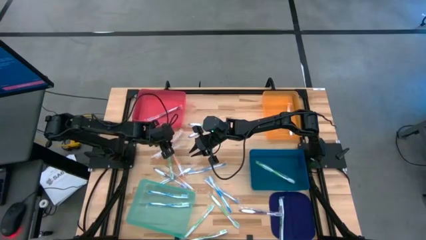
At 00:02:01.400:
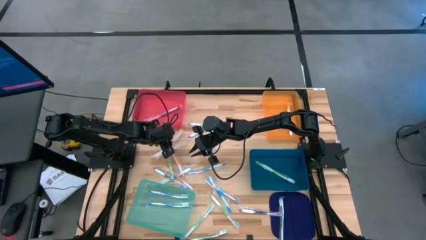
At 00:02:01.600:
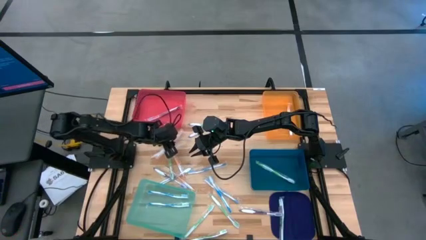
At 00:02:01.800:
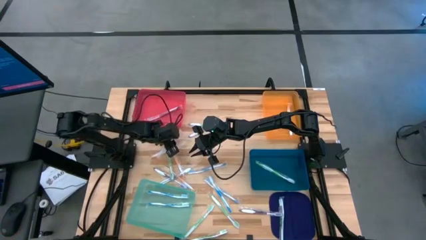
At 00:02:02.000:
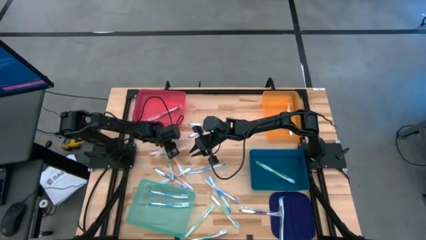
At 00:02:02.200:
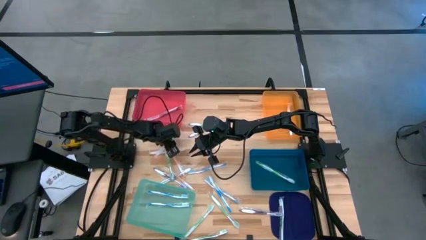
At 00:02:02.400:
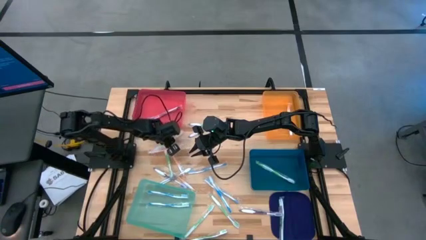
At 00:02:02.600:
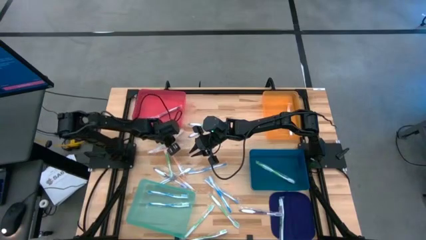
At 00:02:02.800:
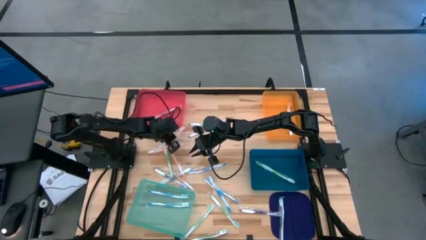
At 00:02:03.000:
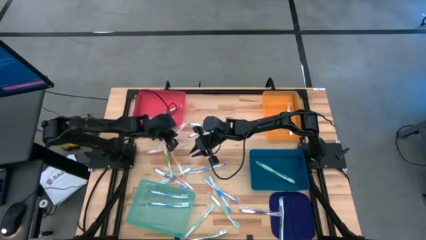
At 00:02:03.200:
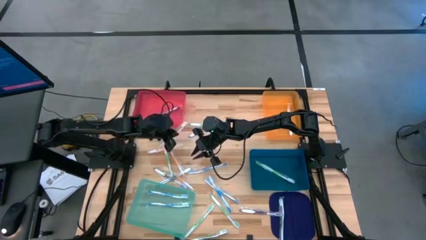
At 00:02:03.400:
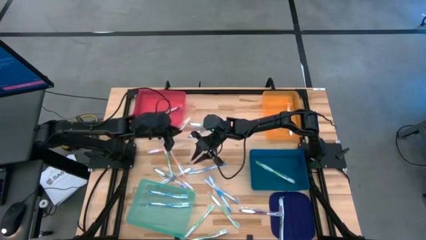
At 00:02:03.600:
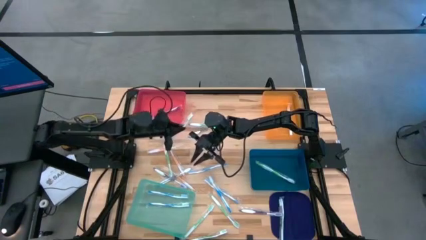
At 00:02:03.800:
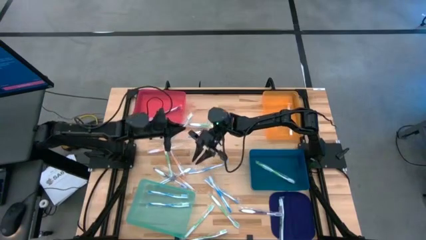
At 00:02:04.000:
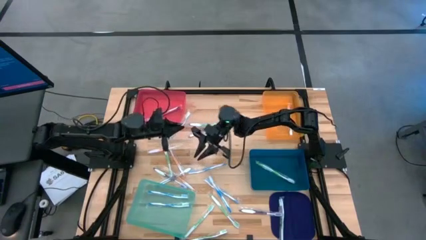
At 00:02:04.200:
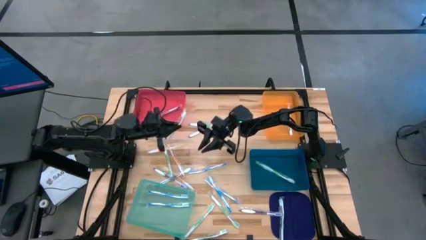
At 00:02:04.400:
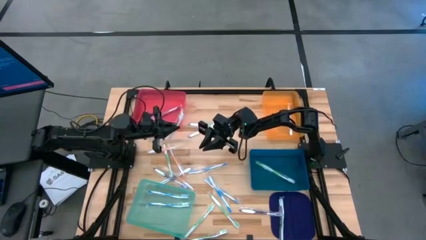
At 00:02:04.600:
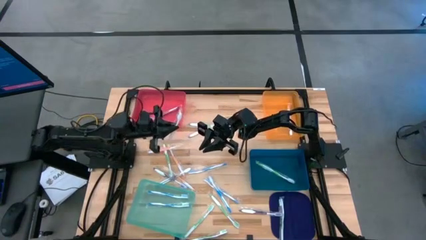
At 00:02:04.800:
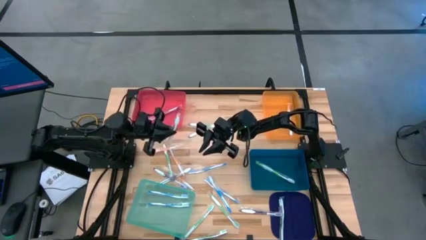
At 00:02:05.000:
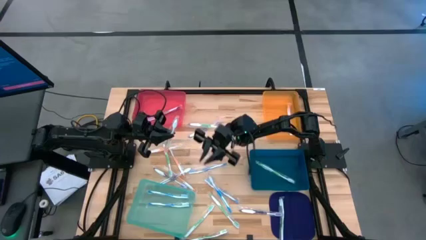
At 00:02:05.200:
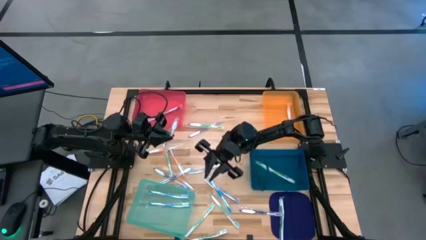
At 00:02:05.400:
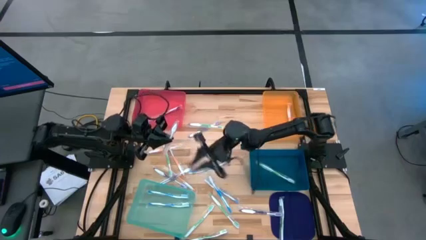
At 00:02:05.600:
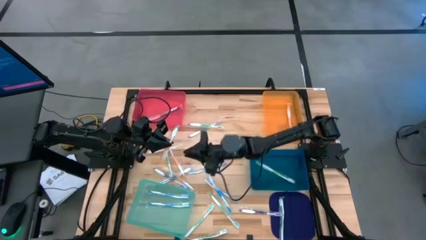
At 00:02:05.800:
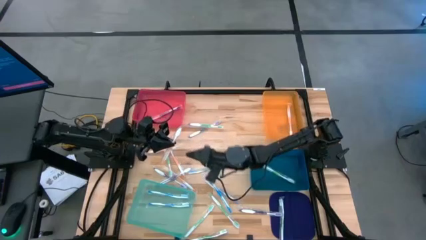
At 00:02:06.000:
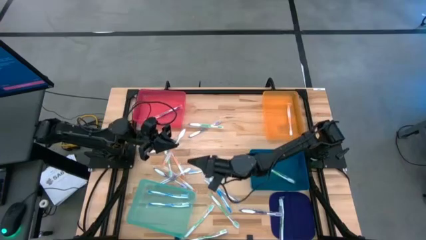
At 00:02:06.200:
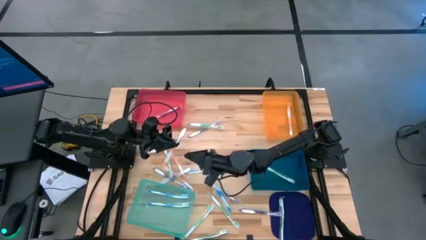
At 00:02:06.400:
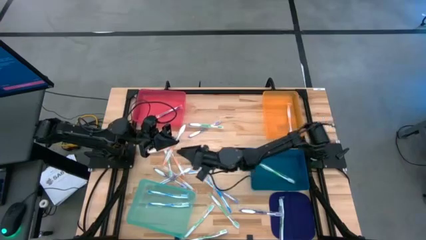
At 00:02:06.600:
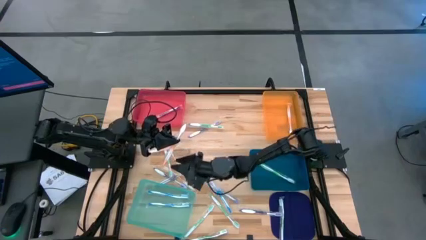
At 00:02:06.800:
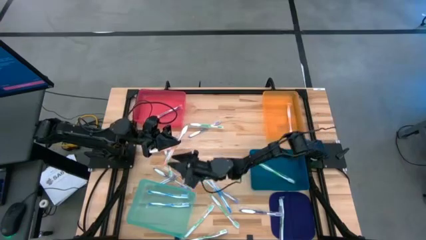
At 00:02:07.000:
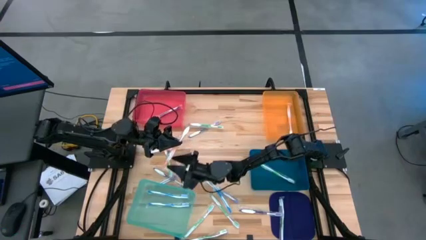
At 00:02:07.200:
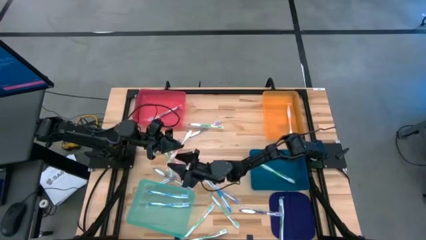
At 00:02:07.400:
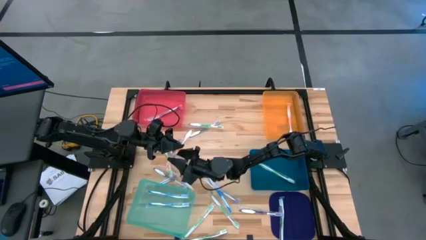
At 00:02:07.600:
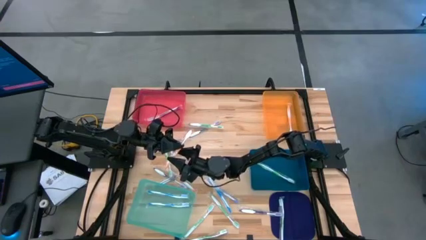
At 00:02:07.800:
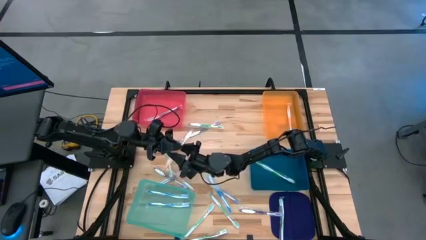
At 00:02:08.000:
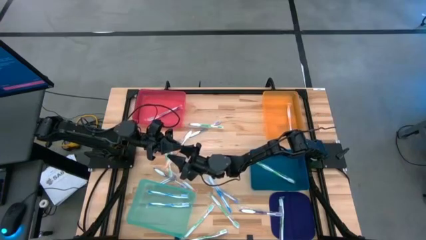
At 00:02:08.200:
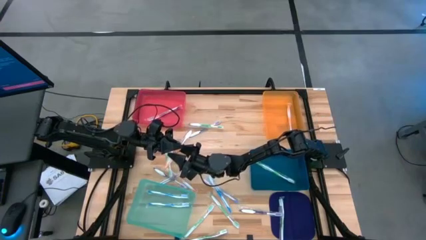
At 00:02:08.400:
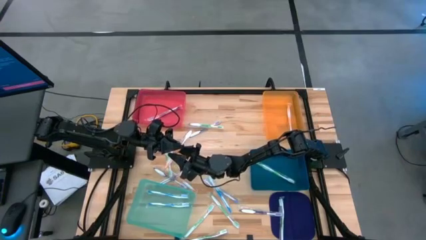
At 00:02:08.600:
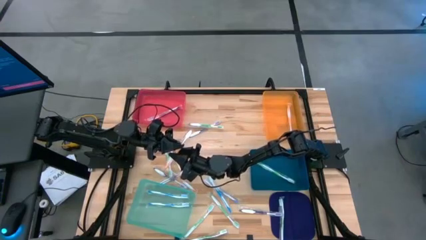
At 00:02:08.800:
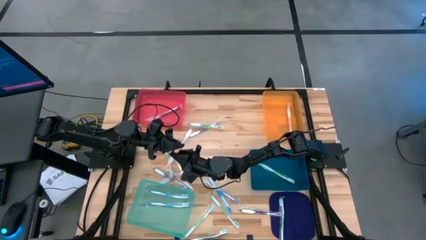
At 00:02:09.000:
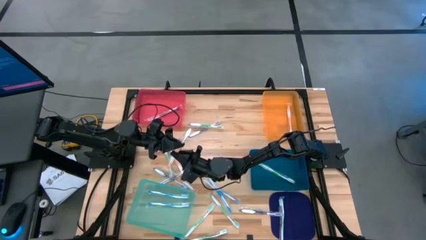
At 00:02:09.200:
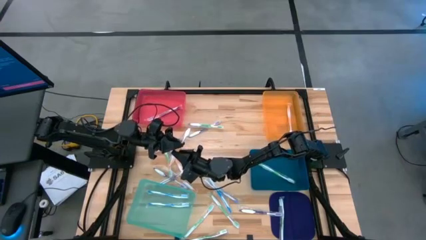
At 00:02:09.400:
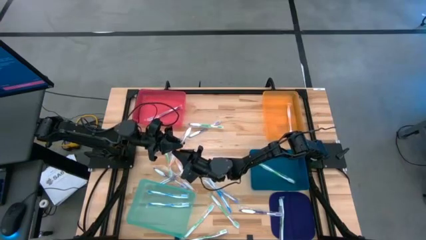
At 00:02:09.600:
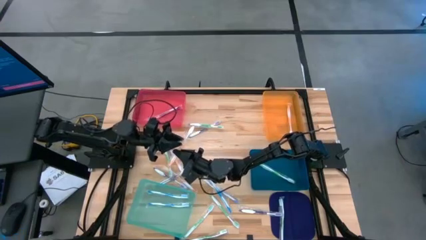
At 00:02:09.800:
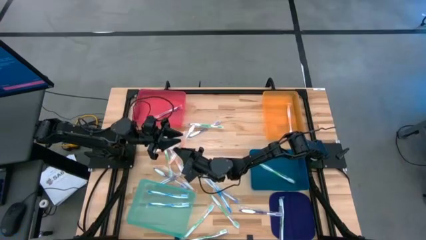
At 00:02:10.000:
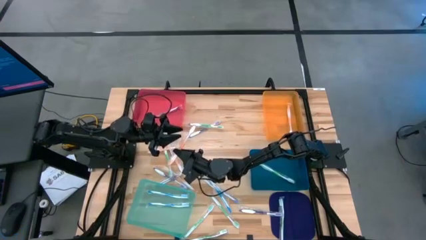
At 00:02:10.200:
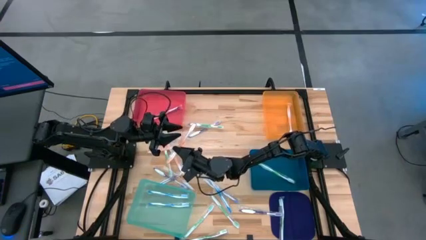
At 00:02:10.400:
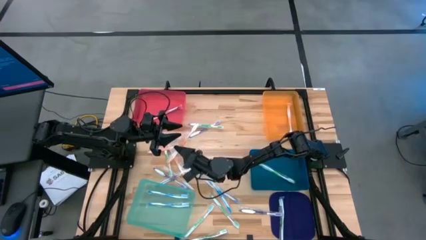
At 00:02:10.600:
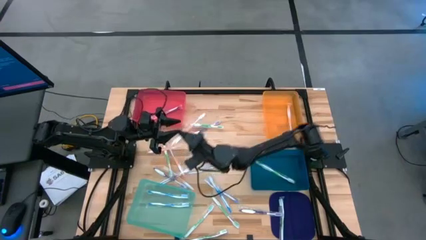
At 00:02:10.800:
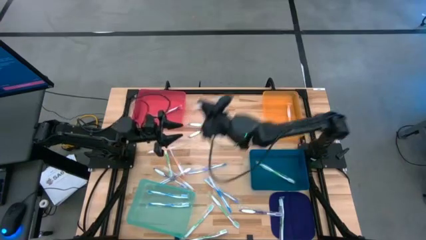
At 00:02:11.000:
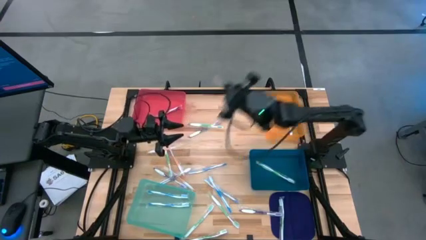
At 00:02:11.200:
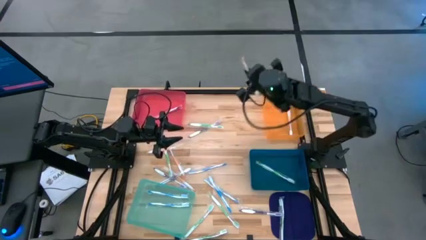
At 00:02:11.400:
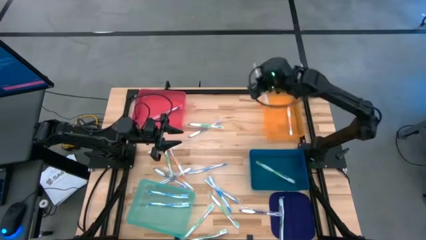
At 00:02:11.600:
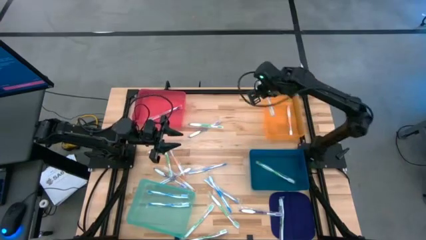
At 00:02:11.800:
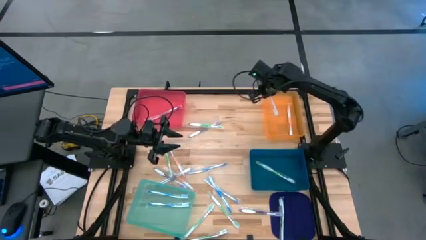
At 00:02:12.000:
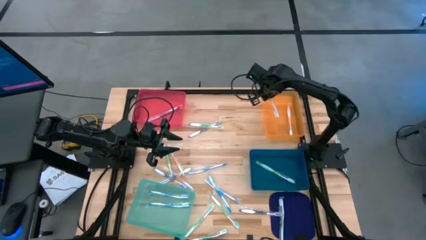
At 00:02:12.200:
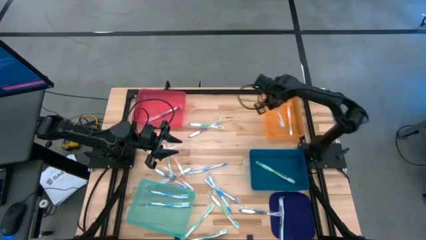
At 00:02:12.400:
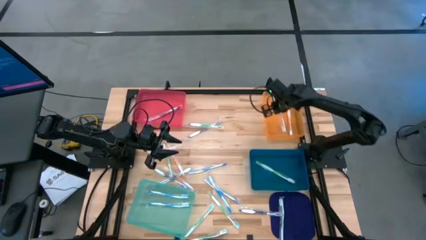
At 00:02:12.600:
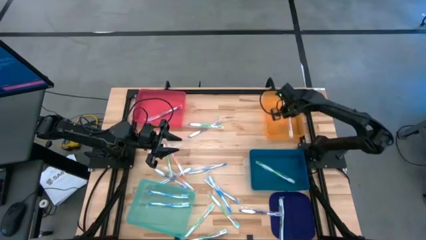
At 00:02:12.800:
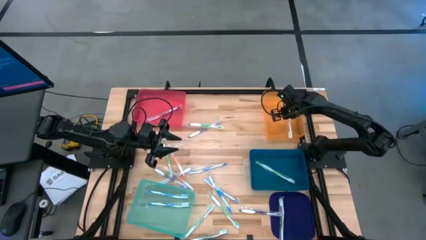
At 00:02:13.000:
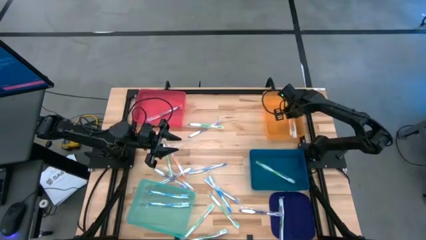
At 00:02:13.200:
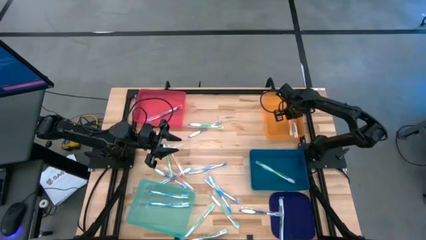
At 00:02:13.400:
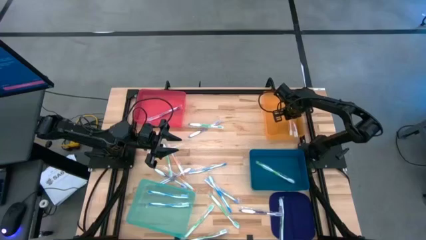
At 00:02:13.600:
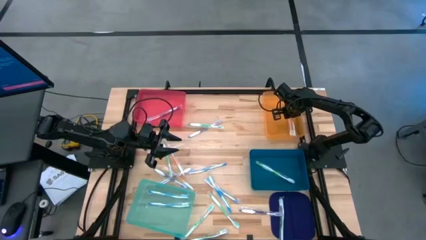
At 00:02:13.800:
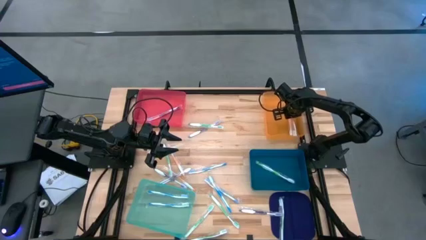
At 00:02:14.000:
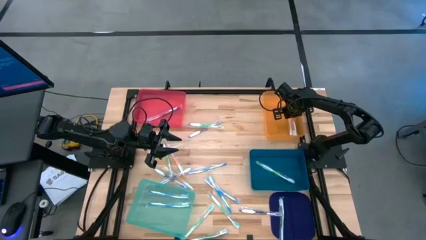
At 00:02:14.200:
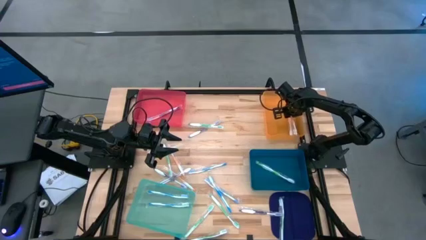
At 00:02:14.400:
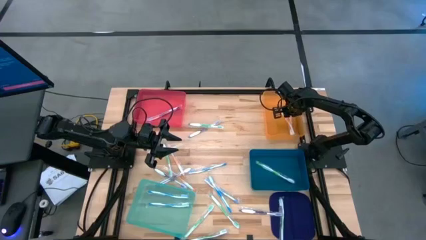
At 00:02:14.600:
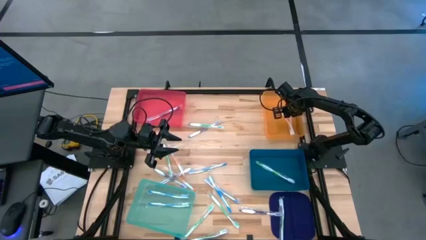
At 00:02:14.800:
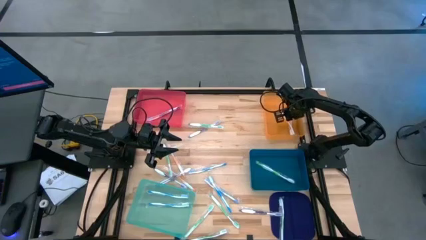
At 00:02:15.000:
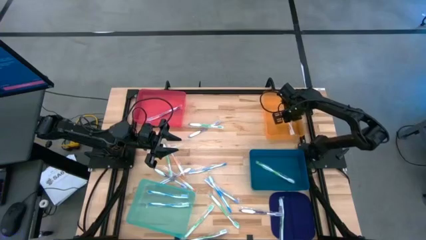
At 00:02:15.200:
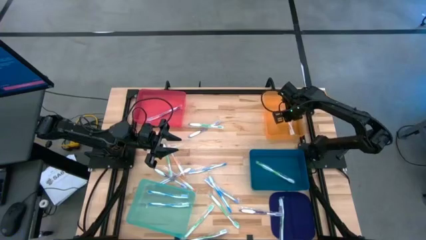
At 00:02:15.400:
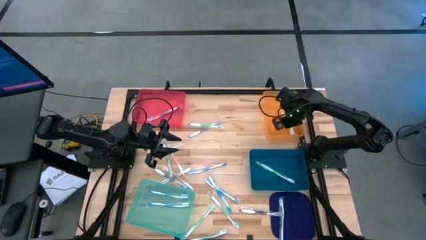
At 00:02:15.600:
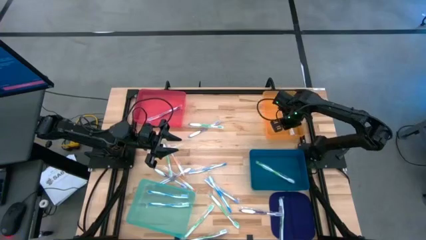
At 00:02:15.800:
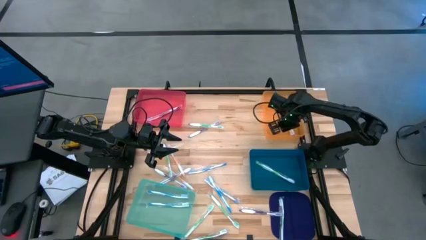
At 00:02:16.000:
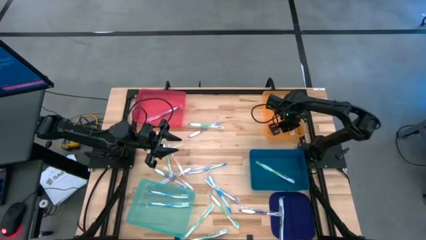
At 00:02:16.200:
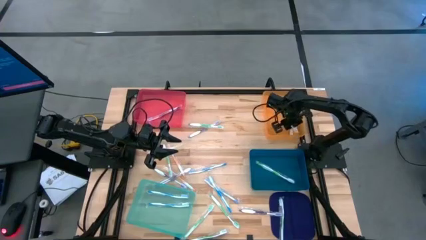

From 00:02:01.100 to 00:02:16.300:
Task: Pick & Place Toothbrushes
Put the orange toothbrush into the orange bin
